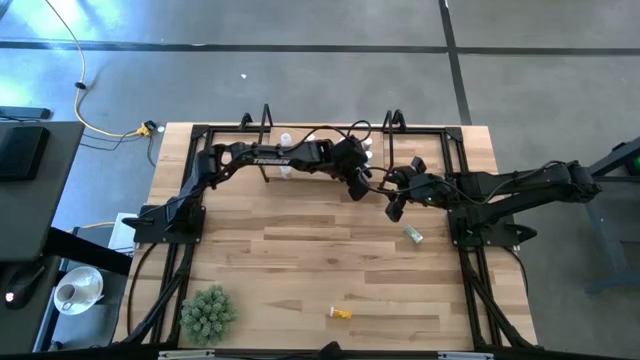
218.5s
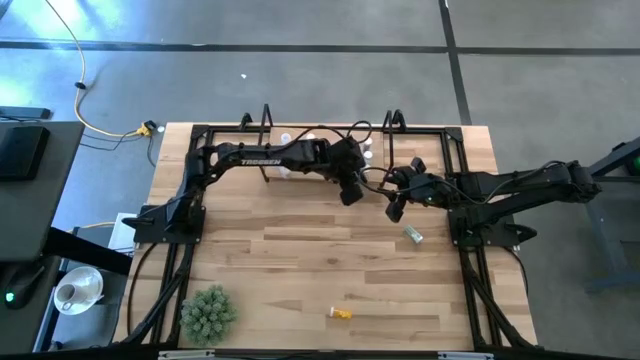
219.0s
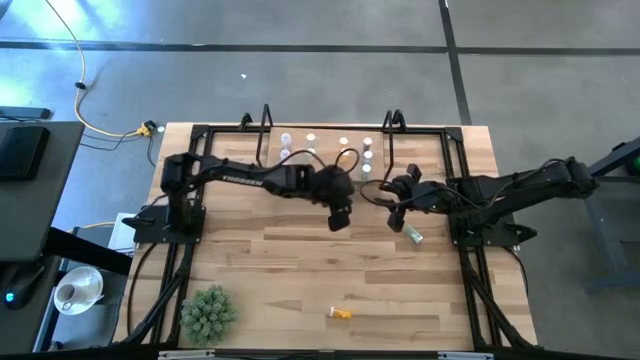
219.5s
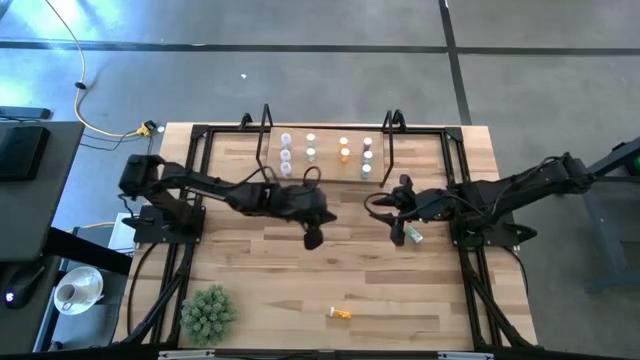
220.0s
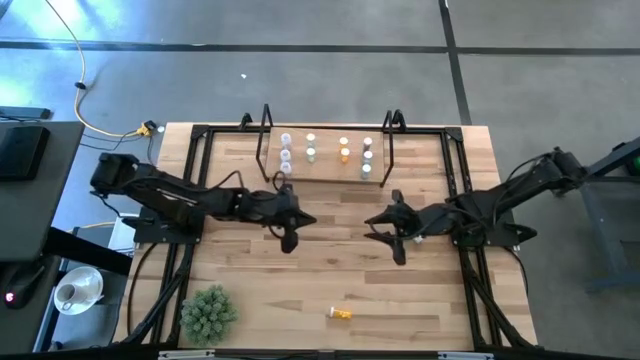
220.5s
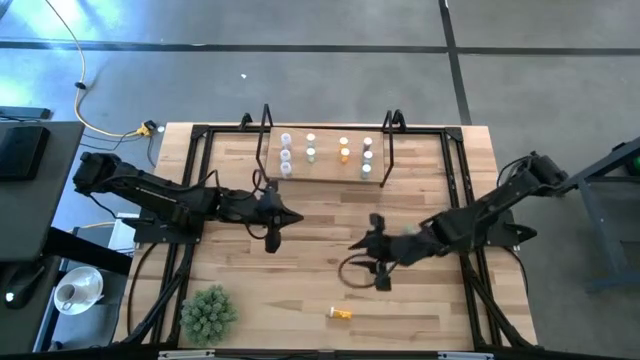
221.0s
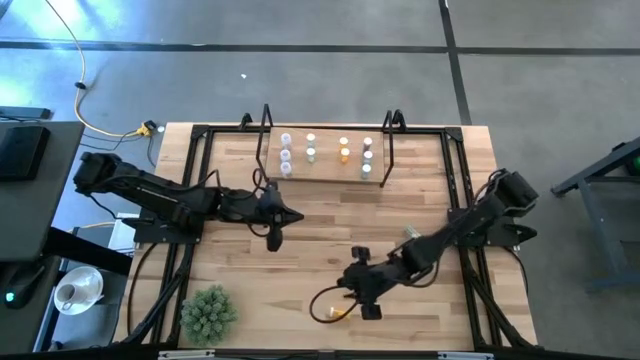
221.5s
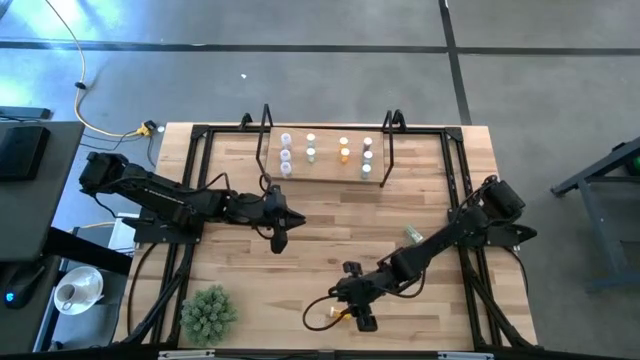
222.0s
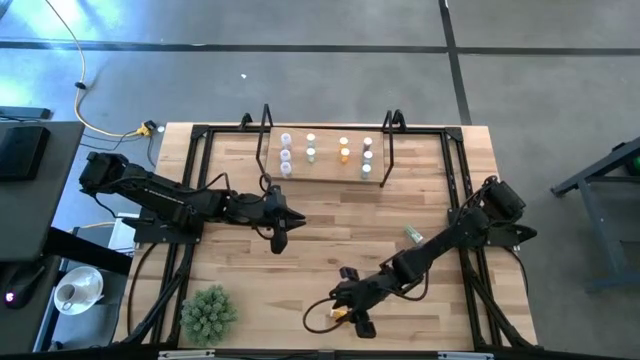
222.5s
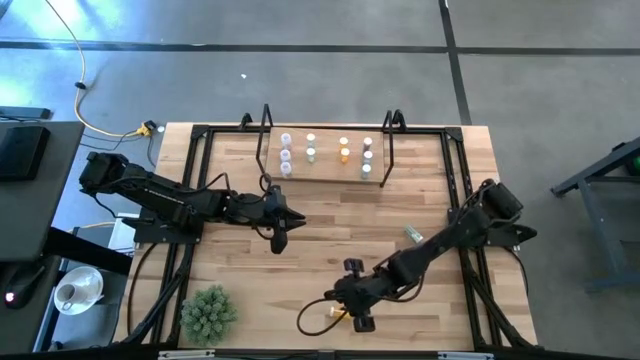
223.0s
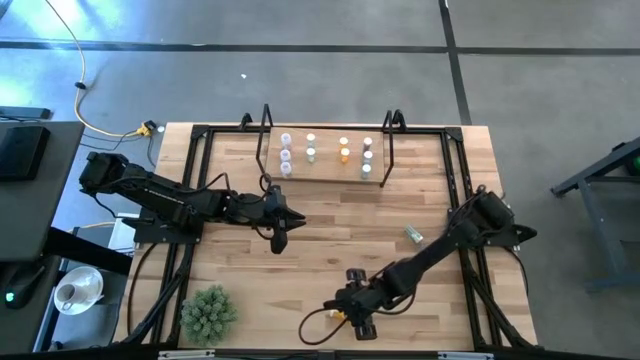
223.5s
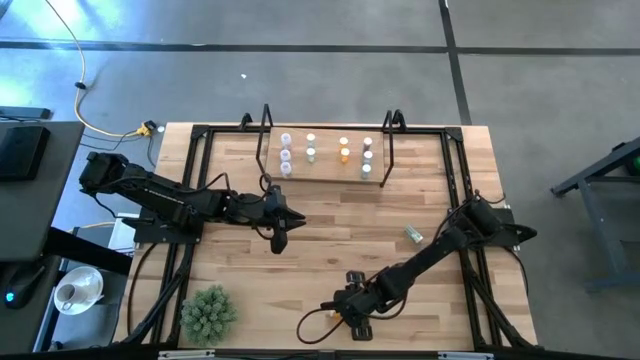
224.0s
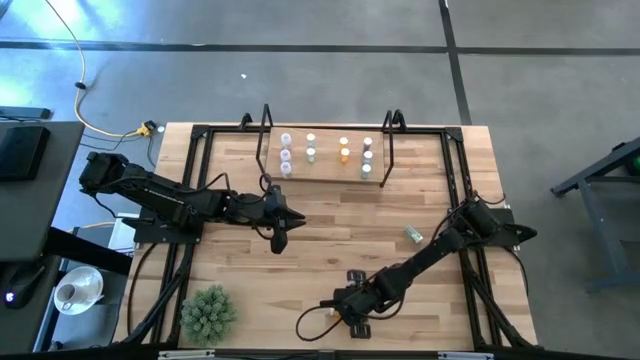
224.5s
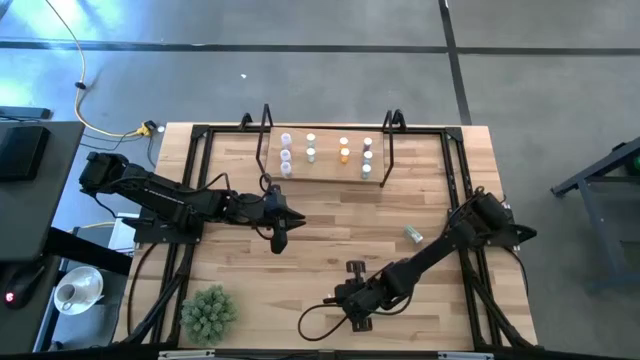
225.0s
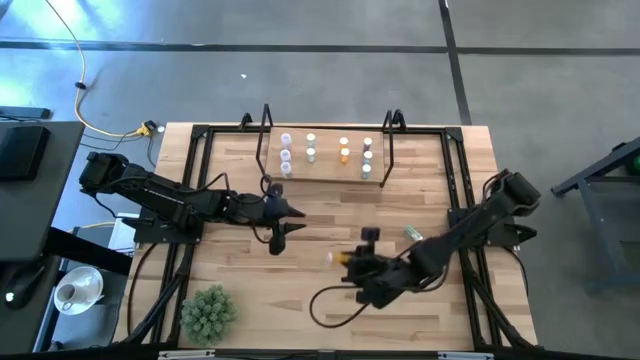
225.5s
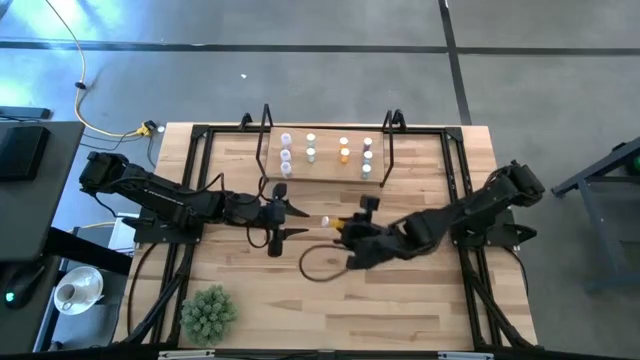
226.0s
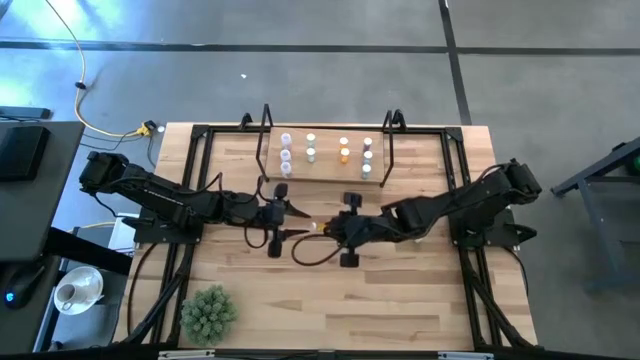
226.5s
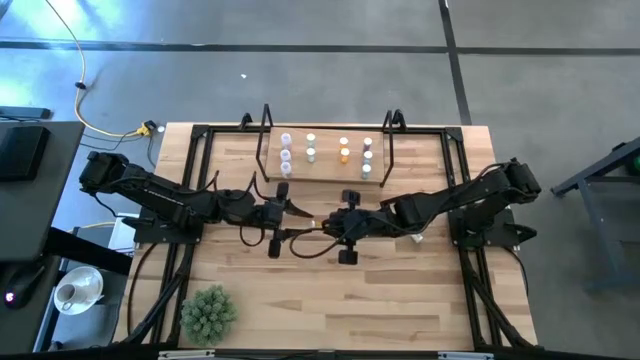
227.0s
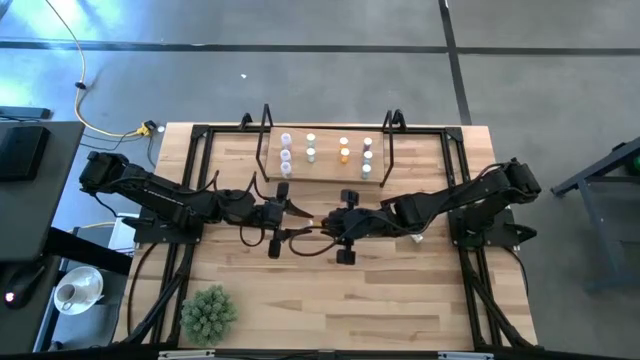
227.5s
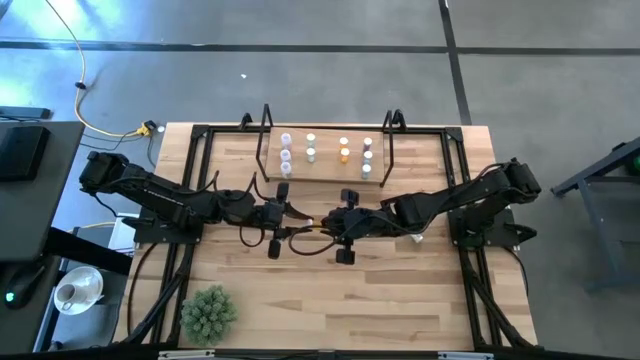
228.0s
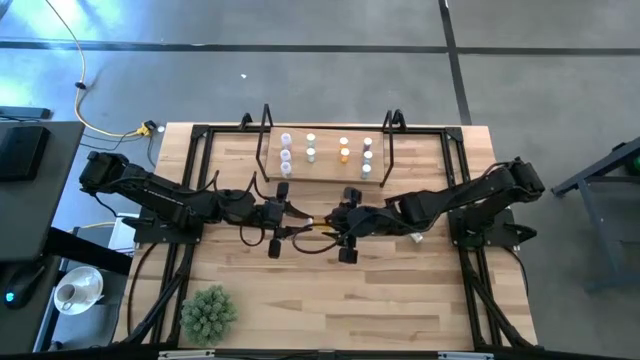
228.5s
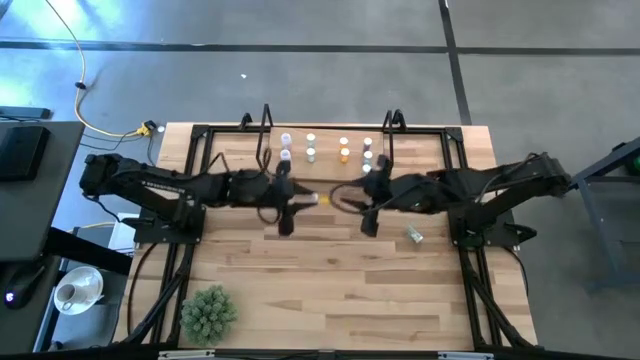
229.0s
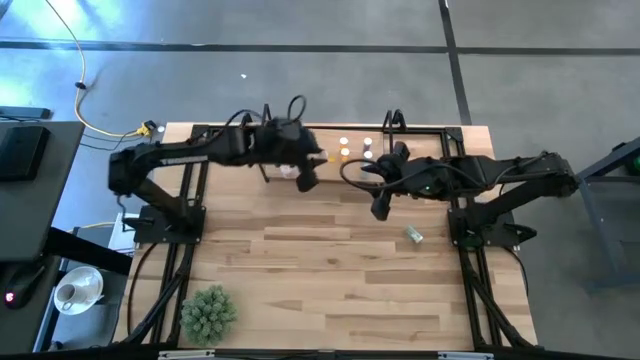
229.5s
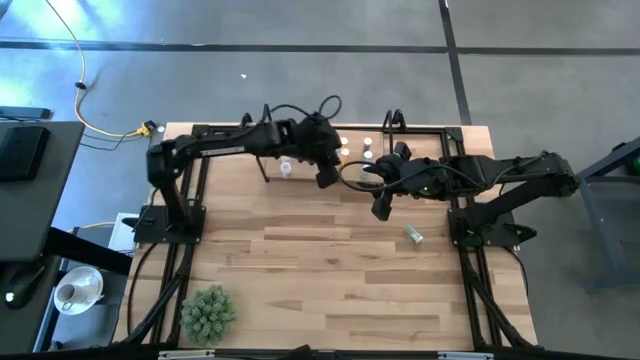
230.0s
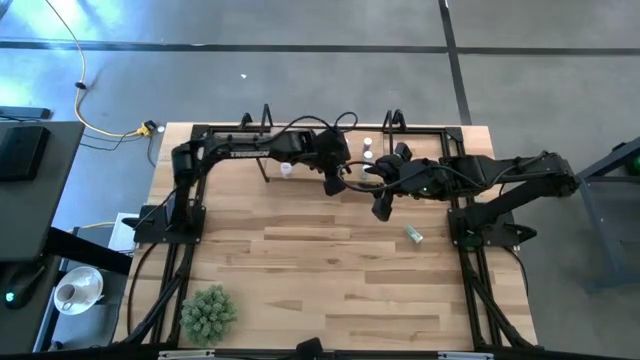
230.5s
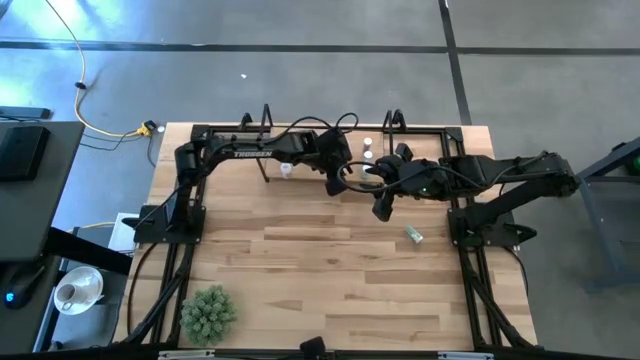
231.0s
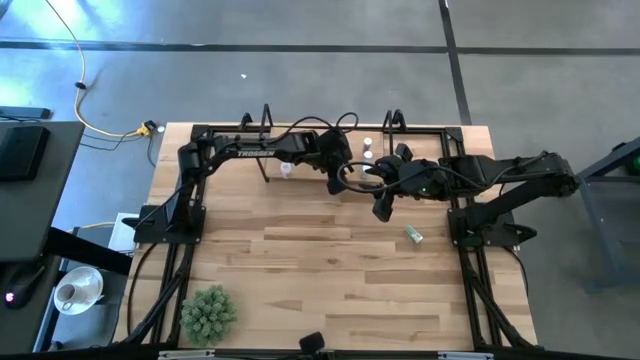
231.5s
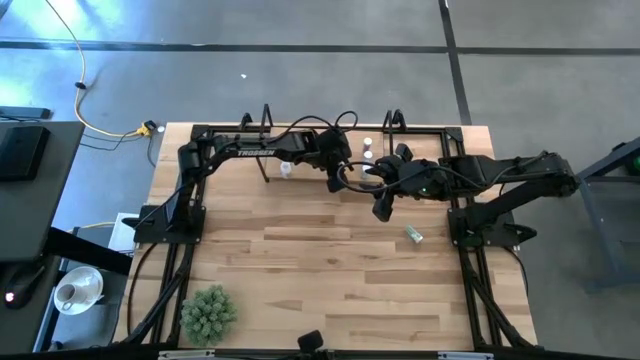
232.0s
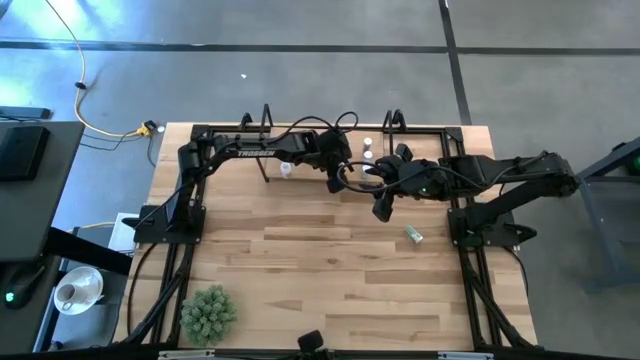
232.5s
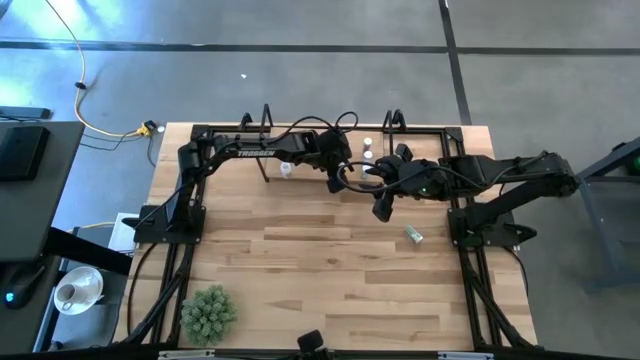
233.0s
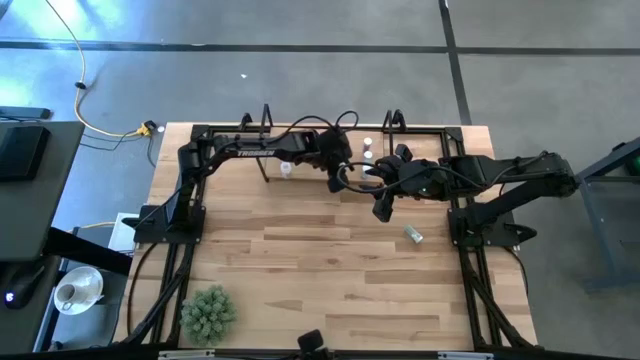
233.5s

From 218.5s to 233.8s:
Task: Pick and place medicine bottles onto shelf by color
Put the orange pill bottle on the shelf aligned with the other orange pill bottles

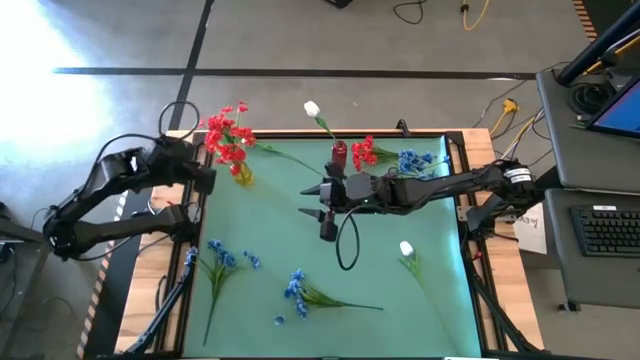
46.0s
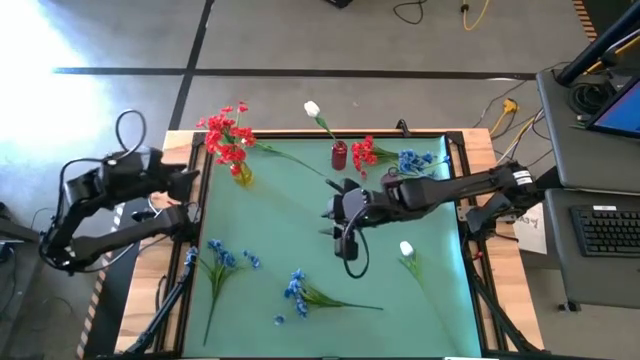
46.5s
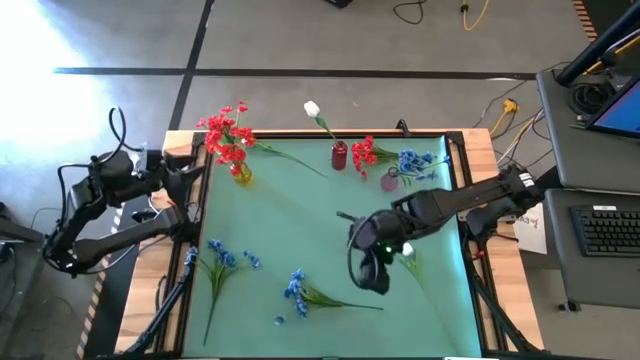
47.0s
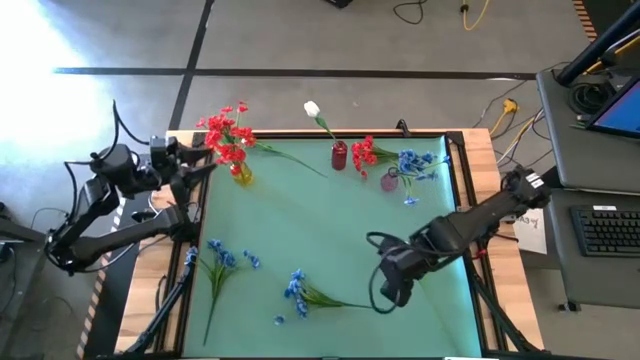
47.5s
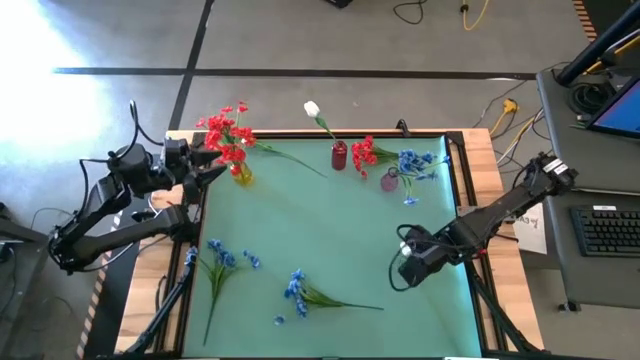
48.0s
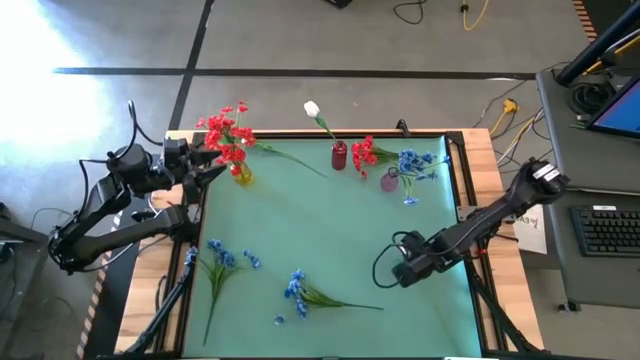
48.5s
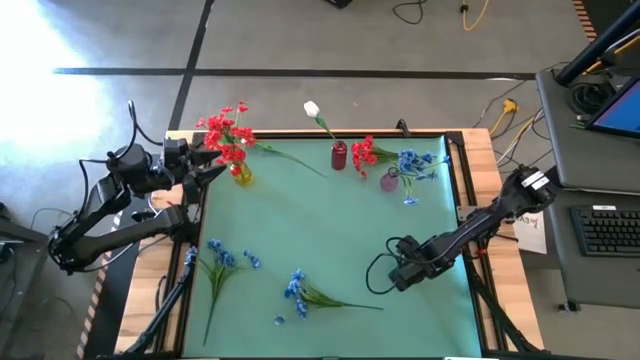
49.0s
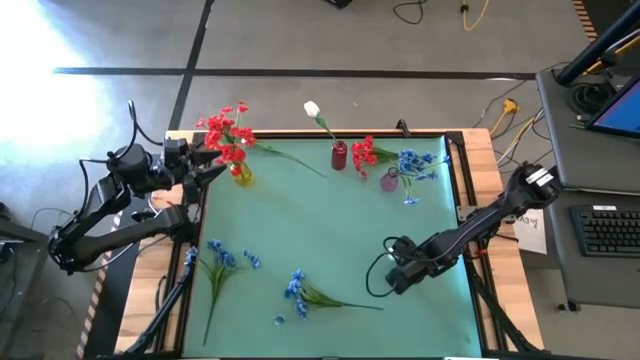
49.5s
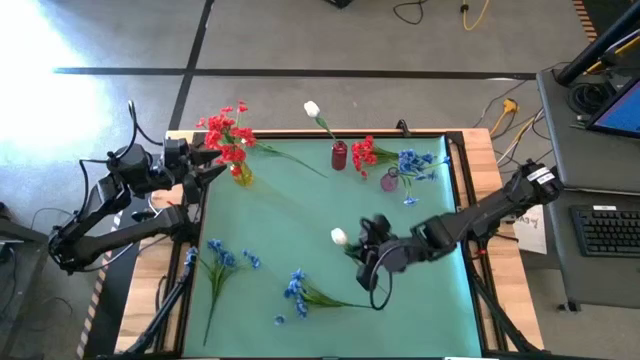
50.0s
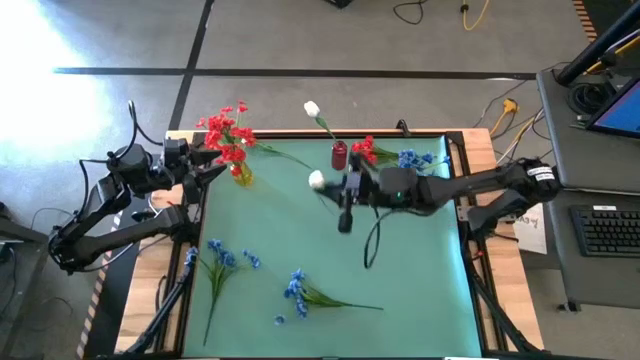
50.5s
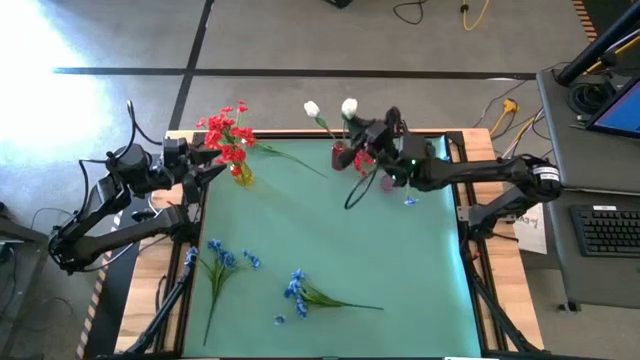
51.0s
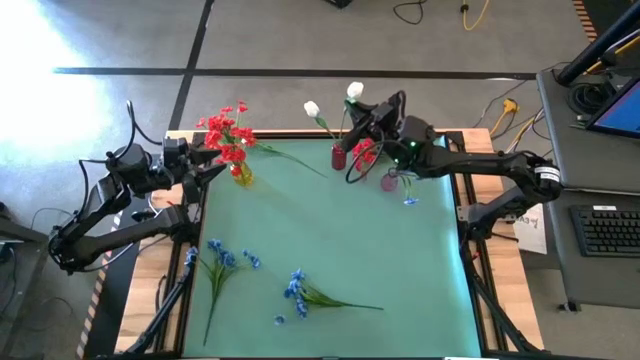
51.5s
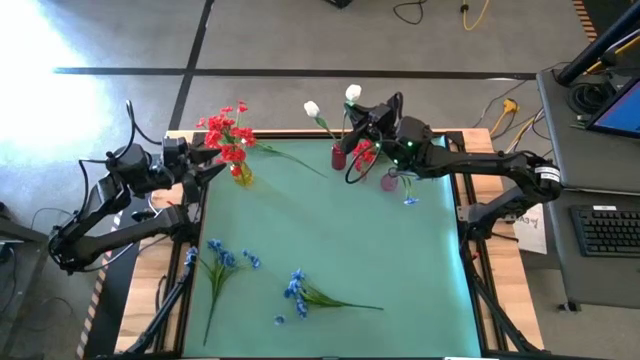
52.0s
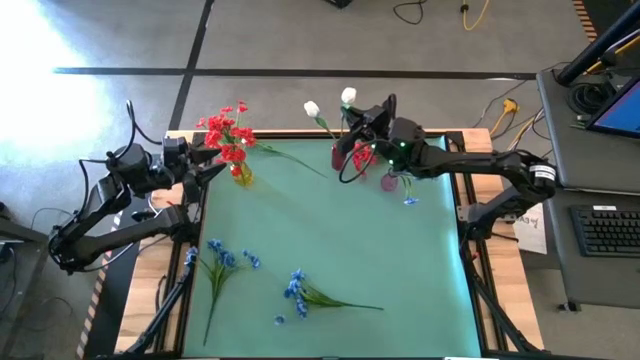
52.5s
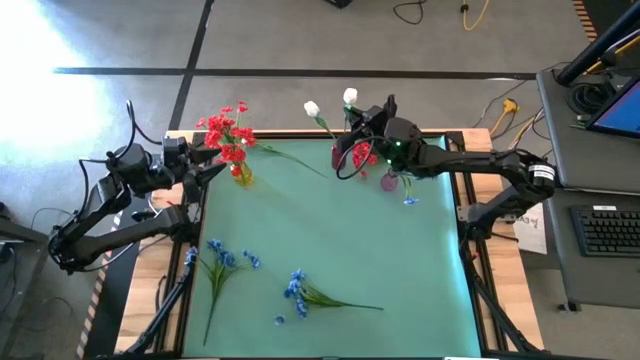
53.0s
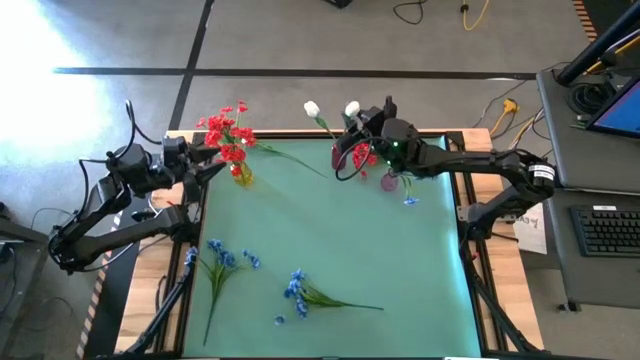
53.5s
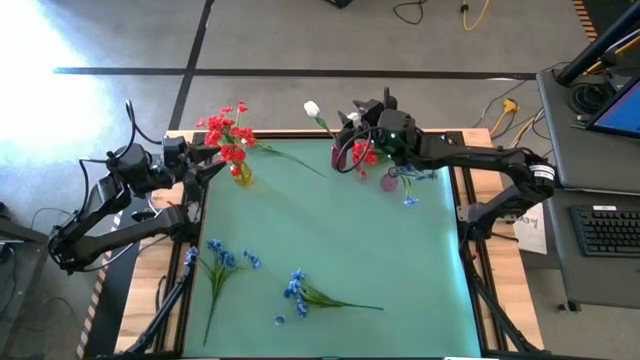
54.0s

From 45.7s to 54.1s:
Task: Sort flowers into vase by color
Put the bottom white flower into the red vase
